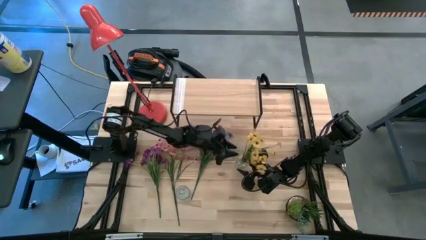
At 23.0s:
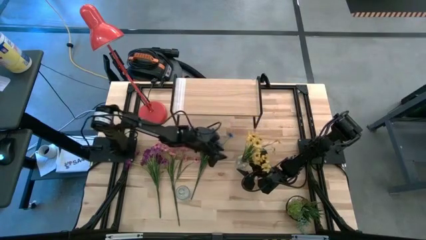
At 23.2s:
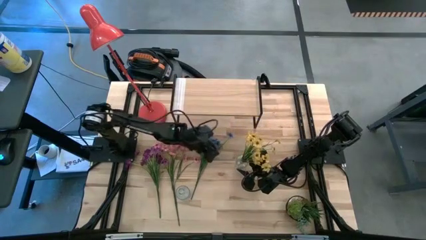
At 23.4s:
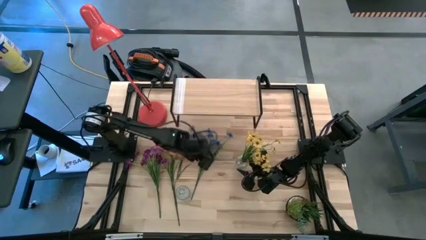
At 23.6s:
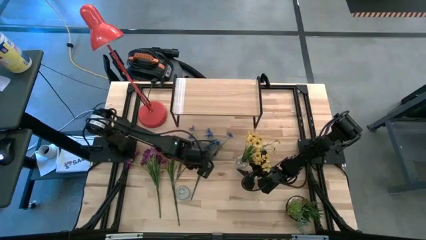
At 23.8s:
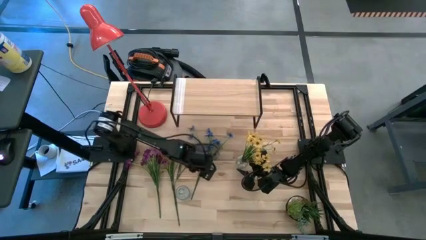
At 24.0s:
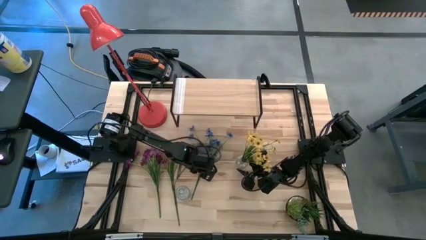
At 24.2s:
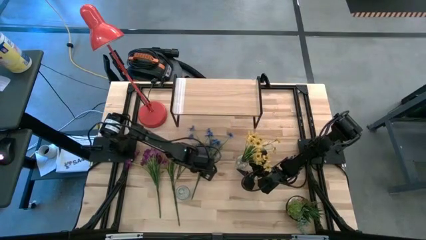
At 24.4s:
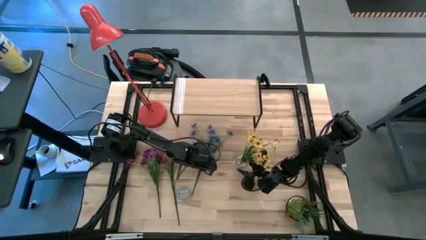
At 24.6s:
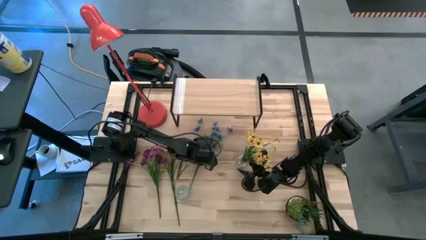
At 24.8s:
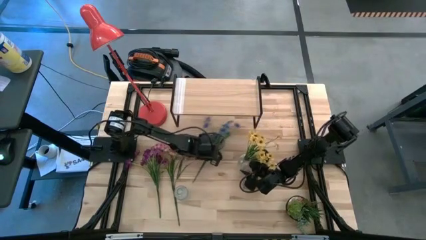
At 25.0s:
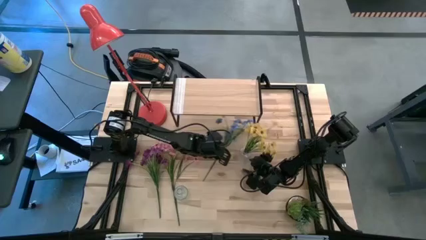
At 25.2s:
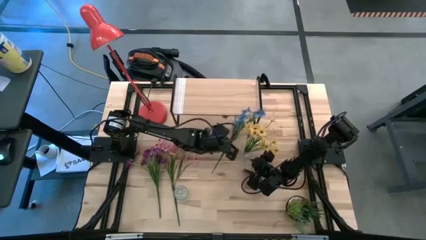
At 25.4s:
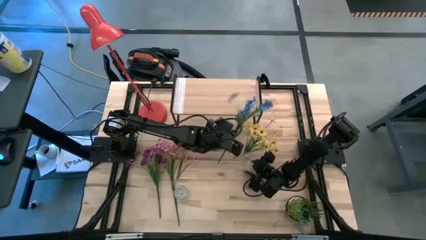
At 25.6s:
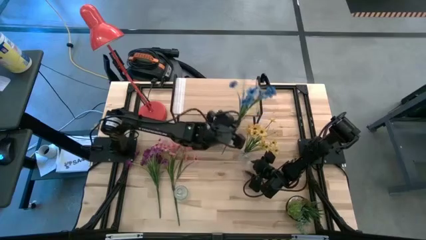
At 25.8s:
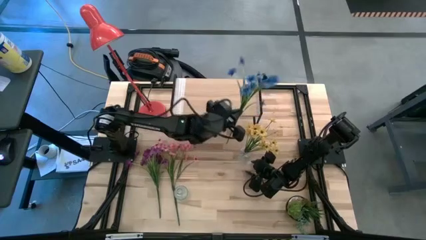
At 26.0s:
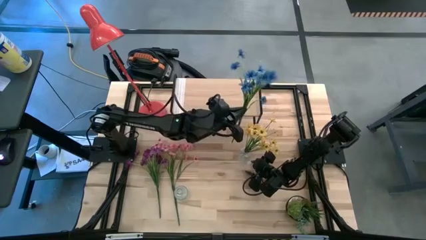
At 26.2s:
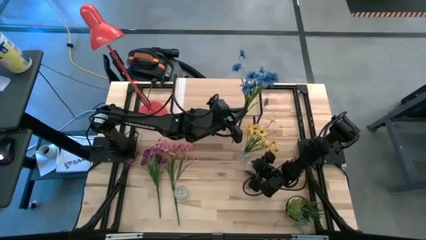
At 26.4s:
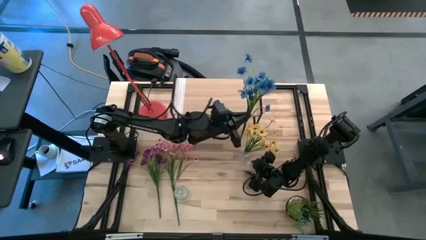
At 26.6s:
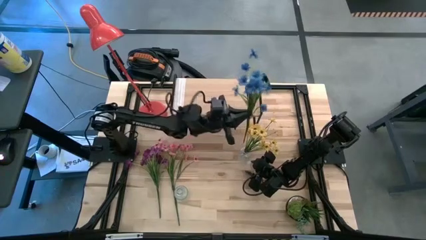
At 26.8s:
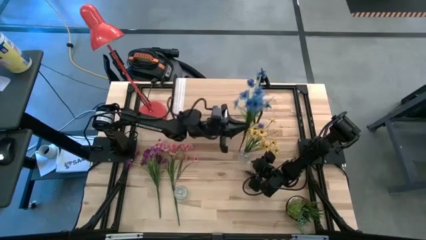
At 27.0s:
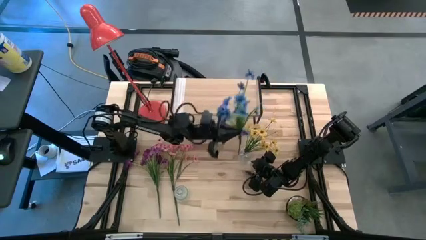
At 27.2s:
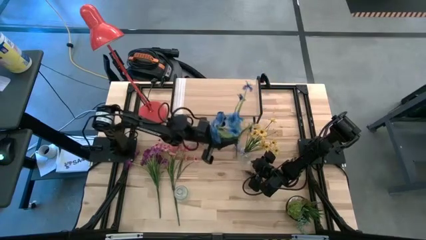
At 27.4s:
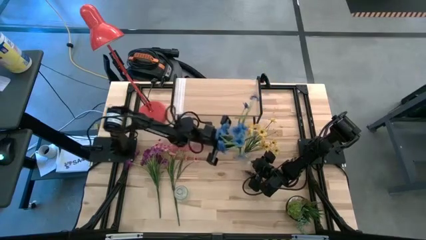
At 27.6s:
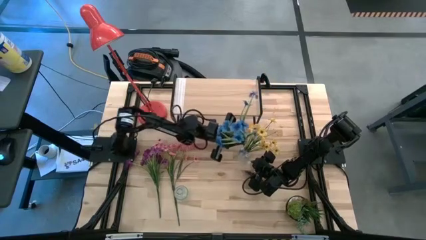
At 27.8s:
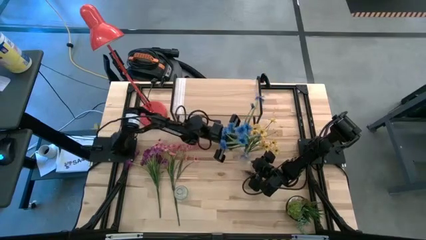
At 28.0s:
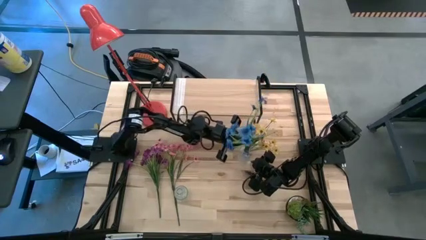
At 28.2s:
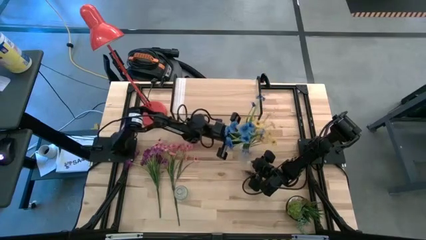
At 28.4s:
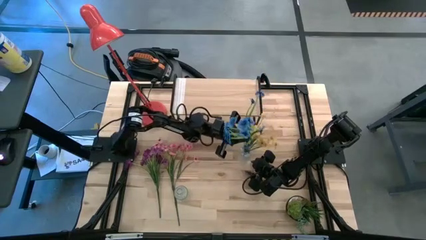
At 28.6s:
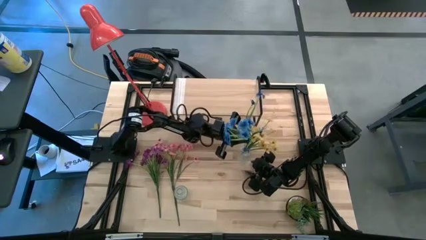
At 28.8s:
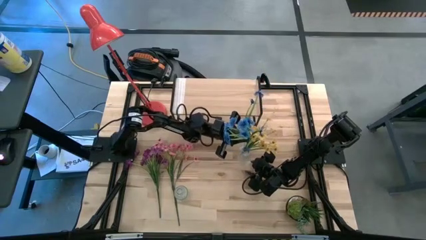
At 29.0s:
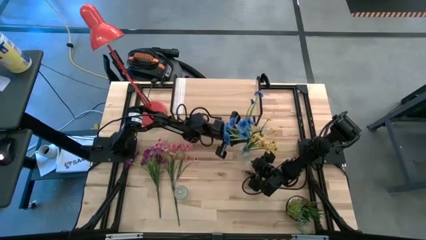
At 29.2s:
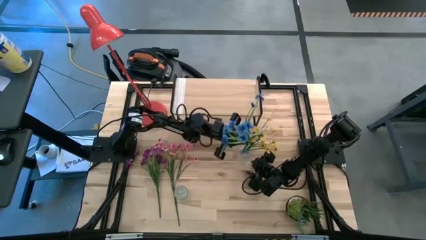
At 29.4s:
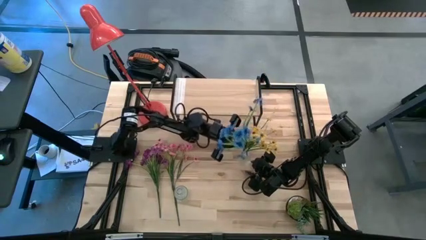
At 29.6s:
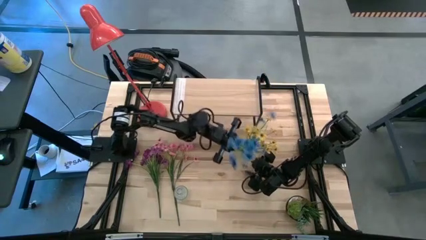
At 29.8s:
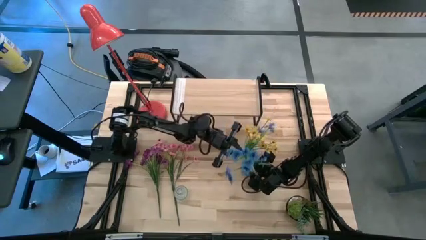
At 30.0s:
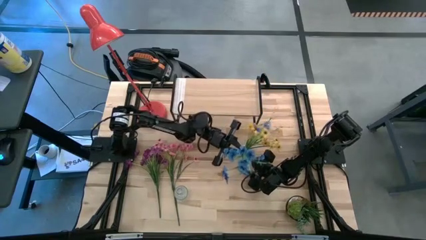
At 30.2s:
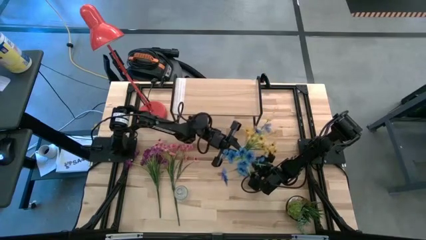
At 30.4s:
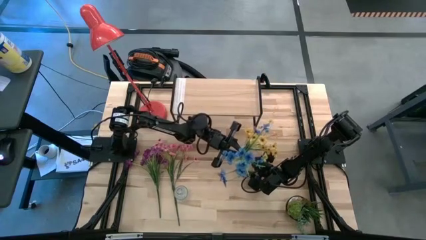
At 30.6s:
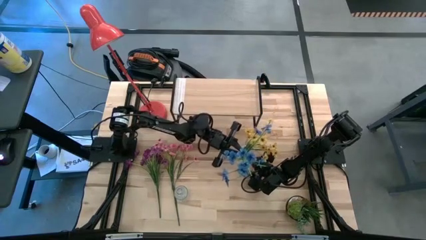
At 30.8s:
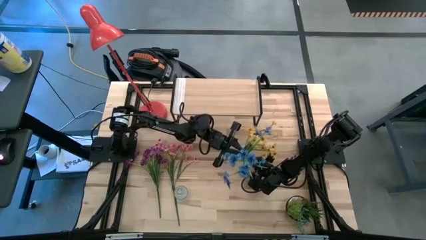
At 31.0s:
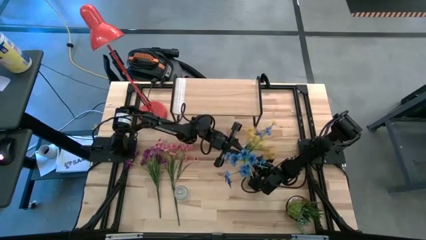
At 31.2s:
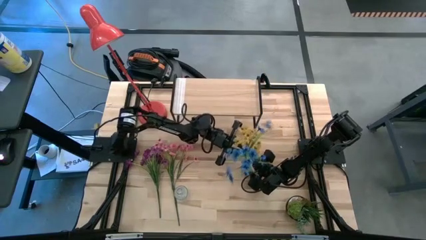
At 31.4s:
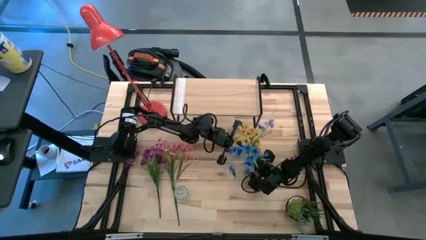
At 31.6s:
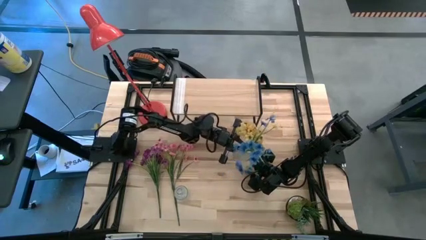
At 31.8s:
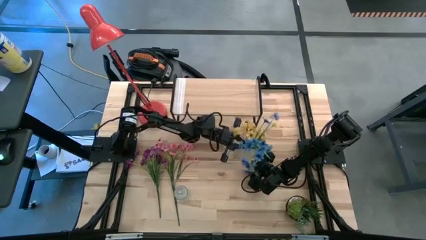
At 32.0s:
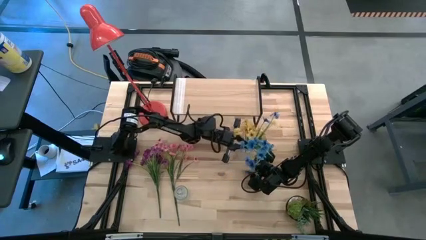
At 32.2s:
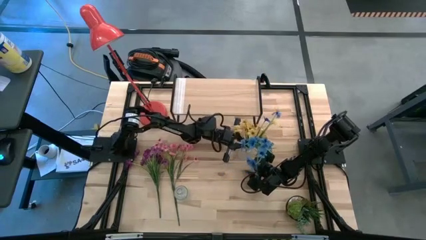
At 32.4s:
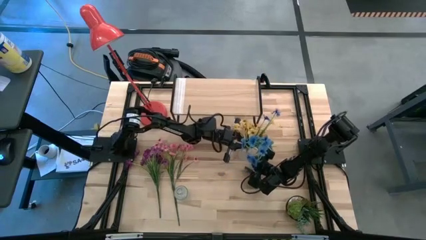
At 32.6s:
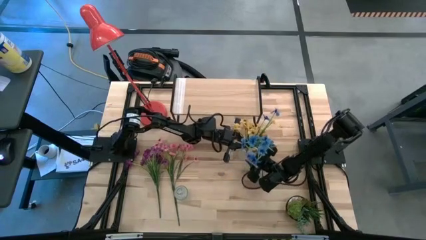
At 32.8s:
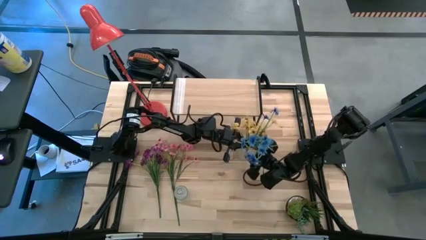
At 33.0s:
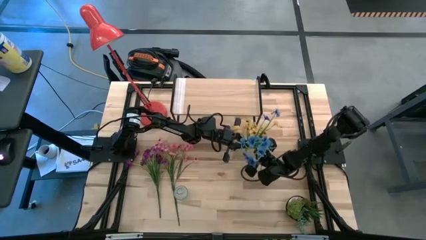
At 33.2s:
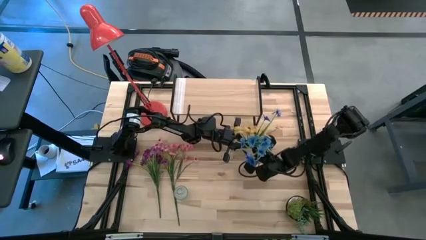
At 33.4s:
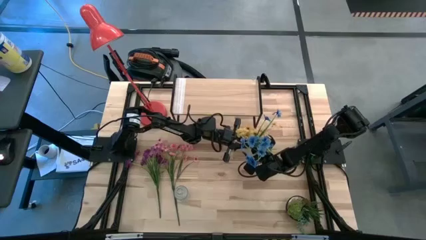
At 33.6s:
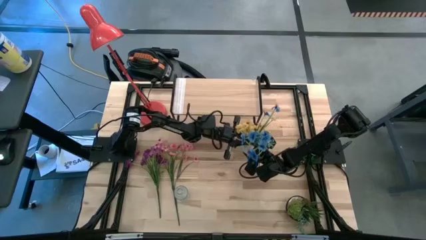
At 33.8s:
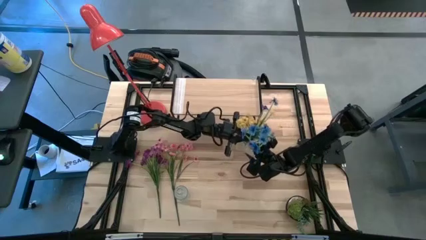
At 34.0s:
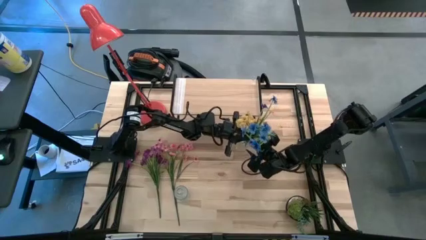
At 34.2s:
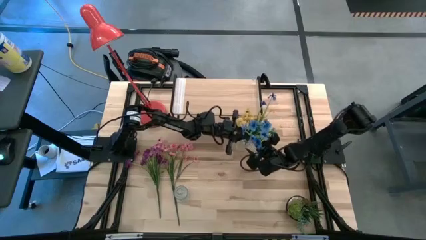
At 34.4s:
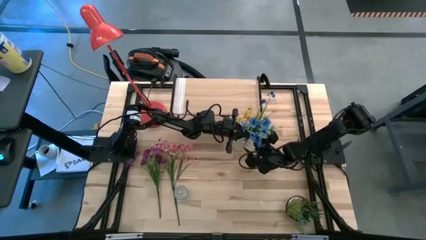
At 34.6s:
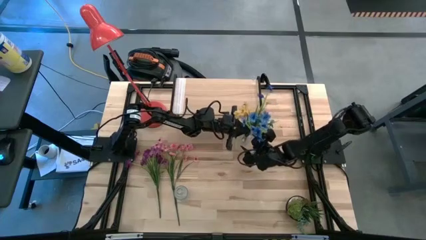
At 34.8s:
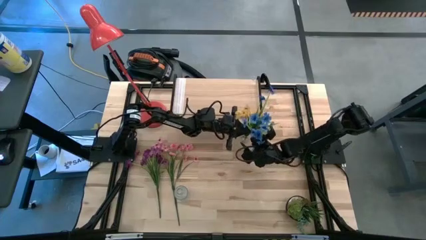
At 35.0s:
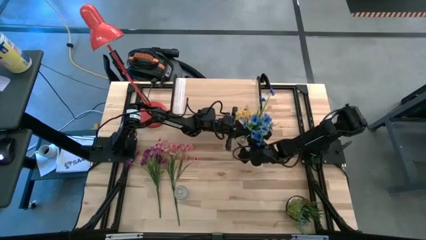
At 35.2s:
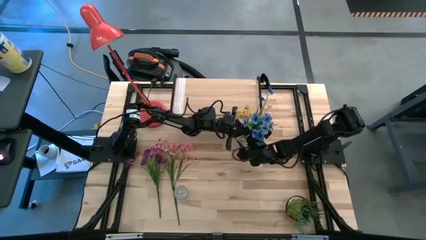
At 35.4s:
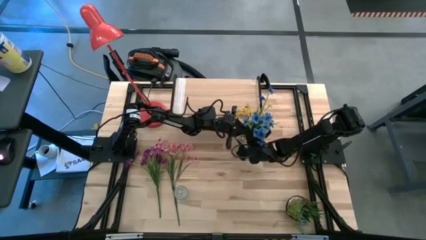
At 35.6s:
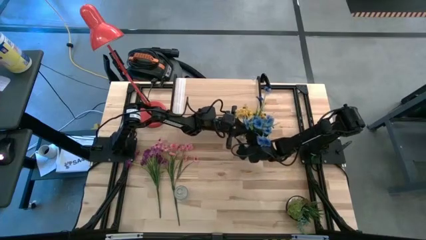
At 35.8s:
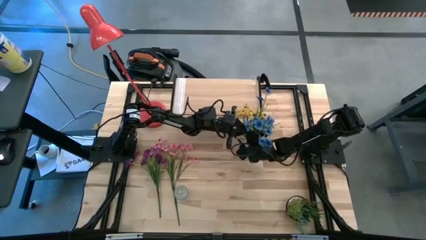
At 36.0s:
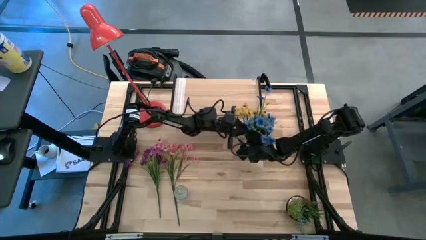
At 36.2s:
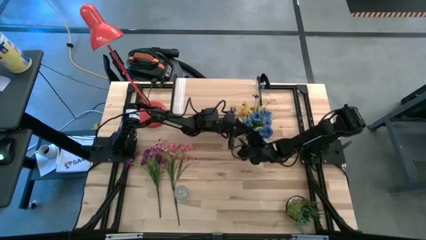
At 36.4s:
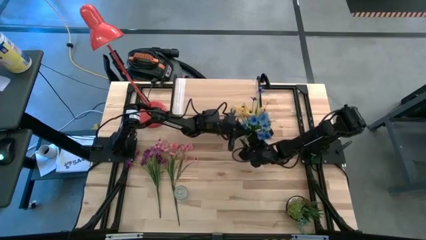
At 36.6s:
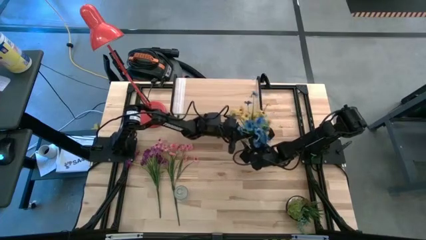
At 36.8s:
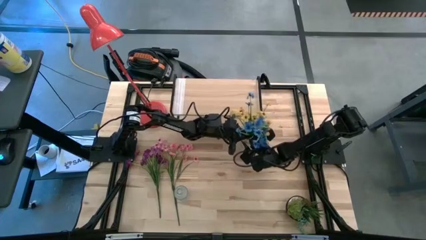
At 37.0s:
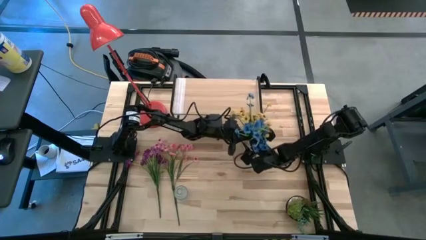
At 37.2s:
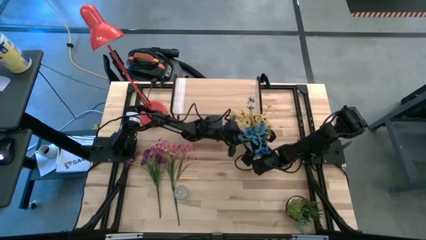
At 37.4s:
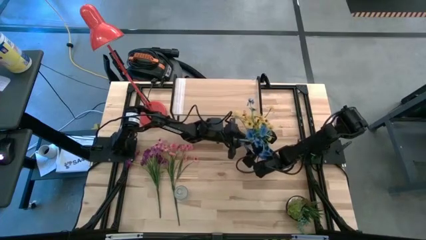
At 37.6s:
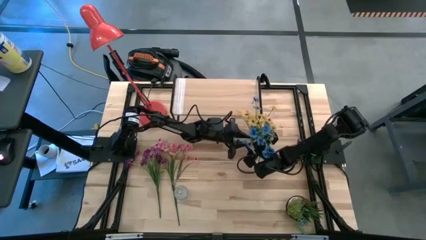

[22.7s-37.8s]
Task: Pick and place flowers into a vace then onto a shelf
Put the blue flowers into the top vase
